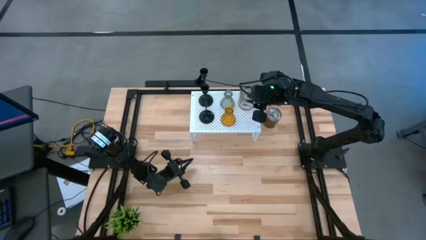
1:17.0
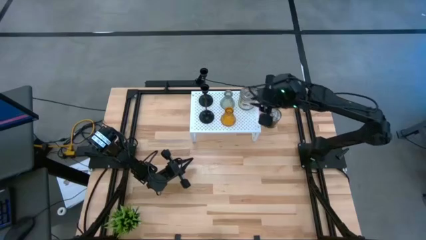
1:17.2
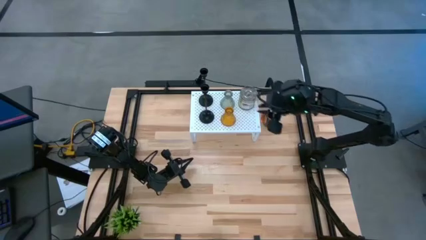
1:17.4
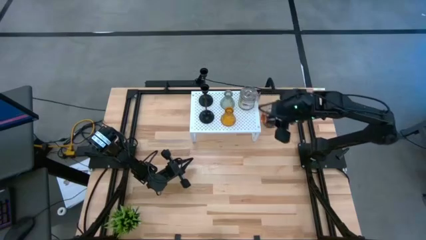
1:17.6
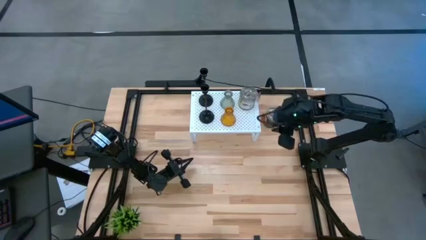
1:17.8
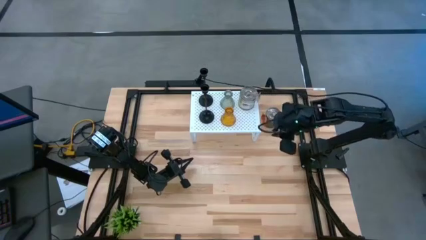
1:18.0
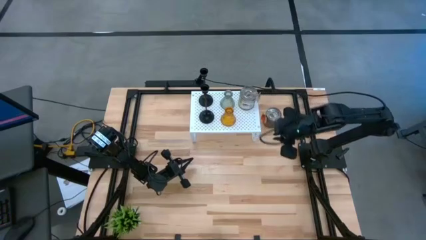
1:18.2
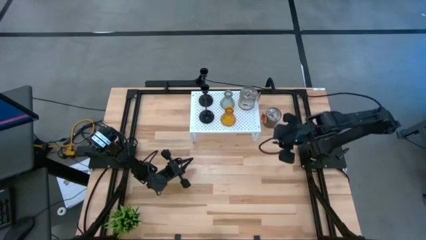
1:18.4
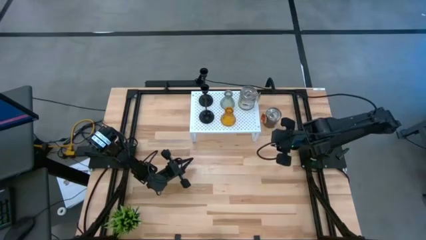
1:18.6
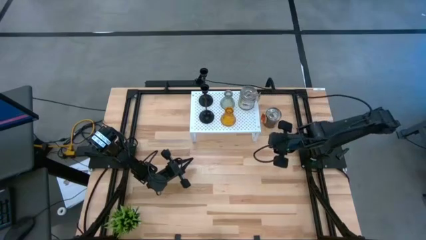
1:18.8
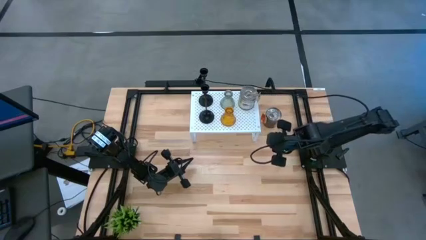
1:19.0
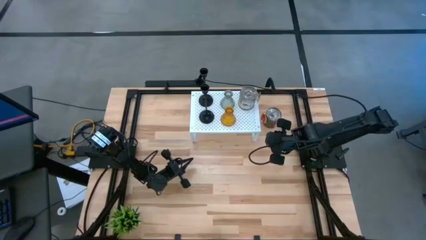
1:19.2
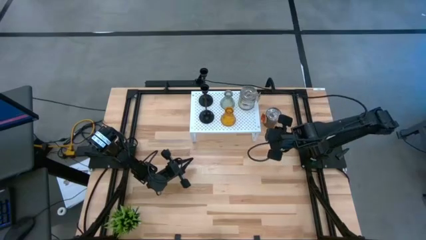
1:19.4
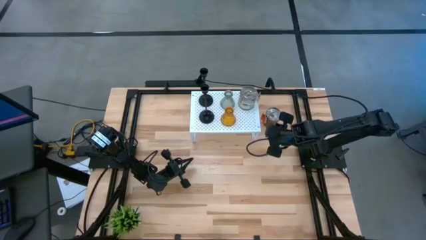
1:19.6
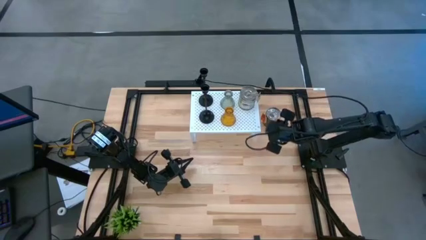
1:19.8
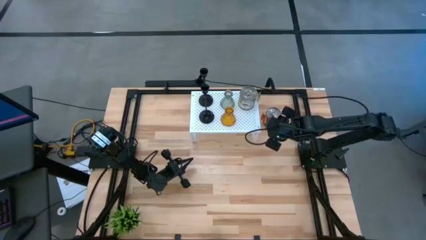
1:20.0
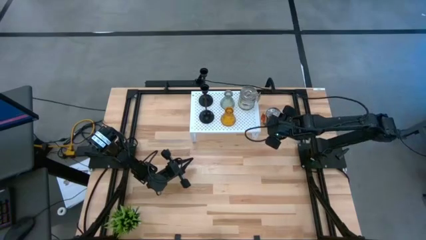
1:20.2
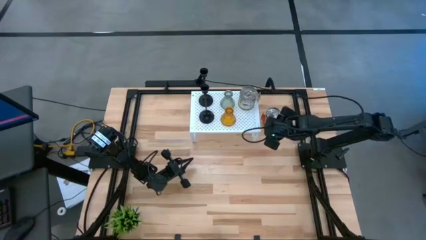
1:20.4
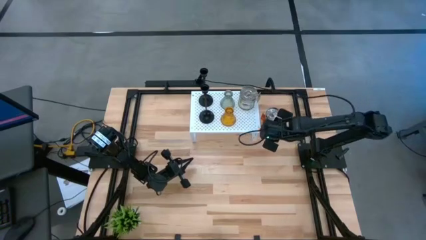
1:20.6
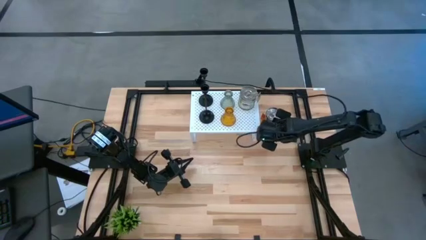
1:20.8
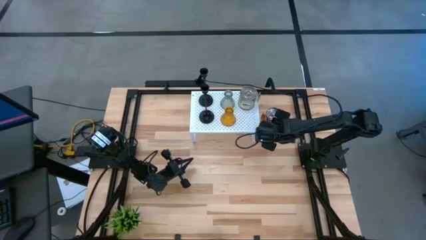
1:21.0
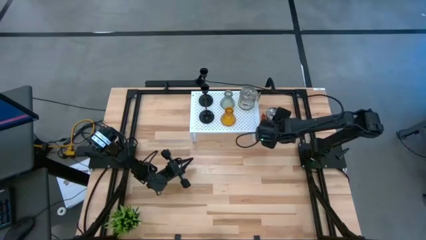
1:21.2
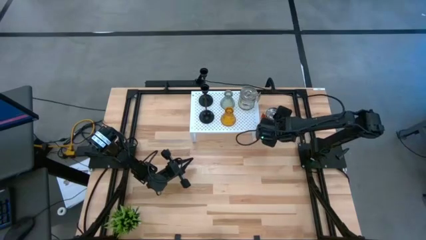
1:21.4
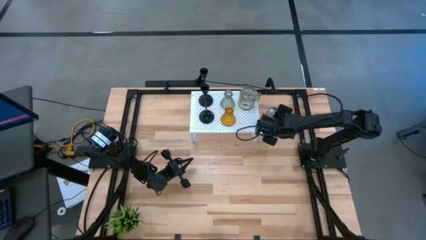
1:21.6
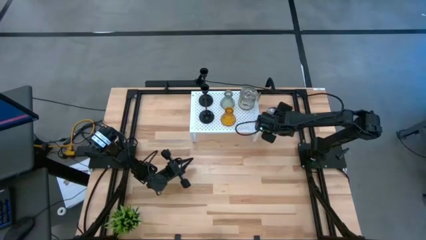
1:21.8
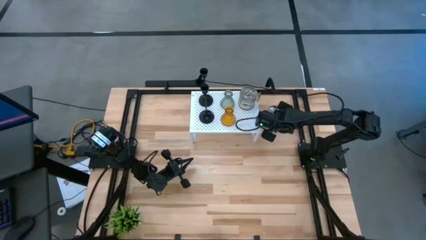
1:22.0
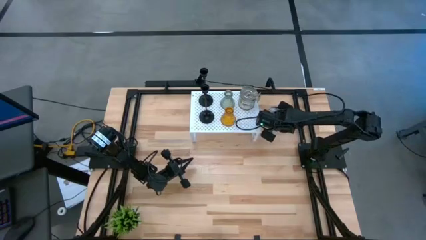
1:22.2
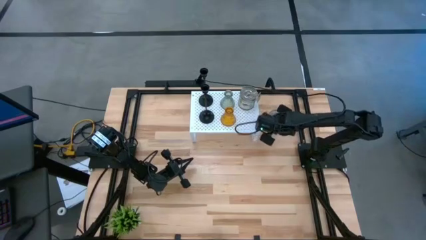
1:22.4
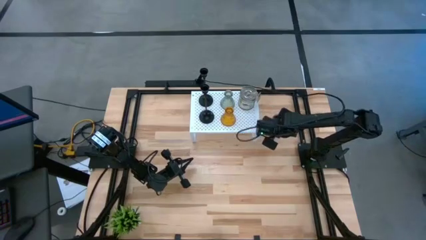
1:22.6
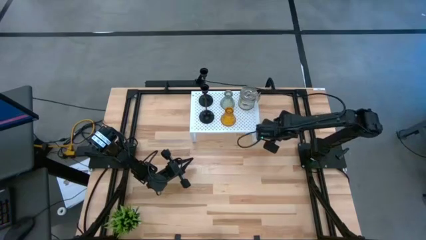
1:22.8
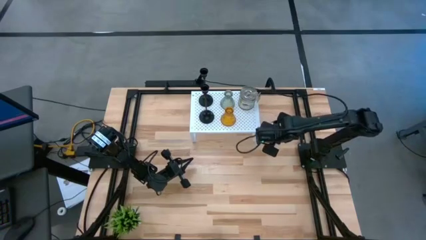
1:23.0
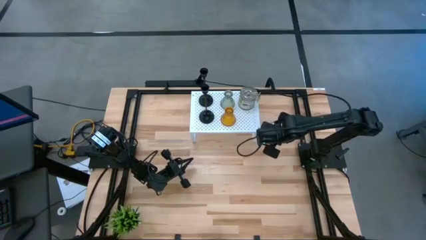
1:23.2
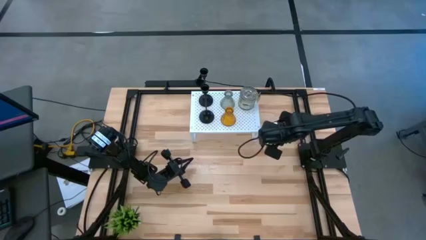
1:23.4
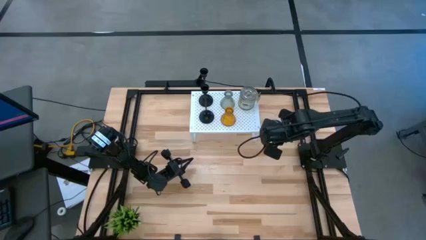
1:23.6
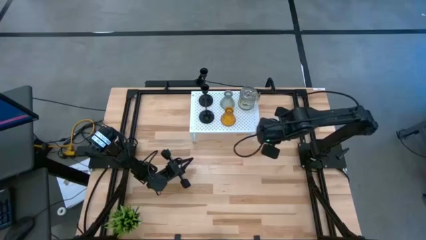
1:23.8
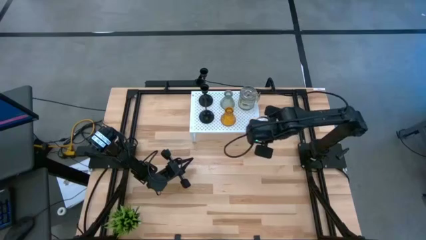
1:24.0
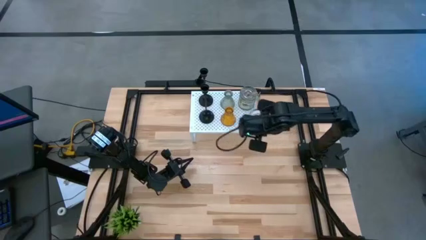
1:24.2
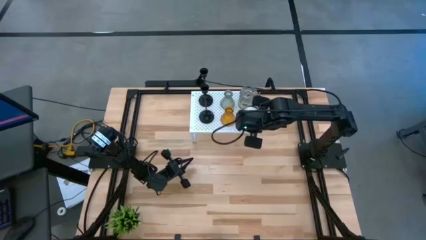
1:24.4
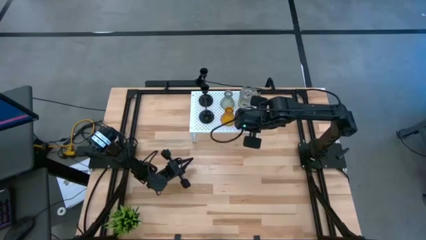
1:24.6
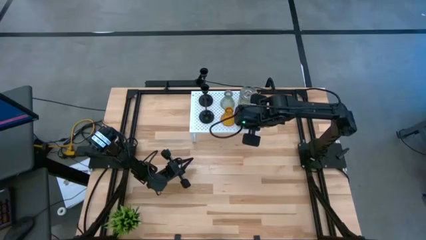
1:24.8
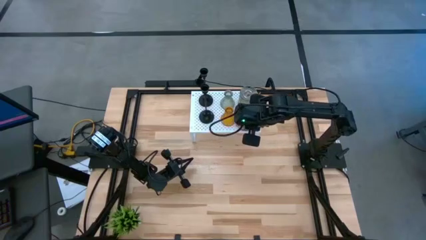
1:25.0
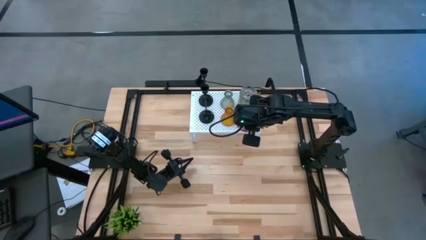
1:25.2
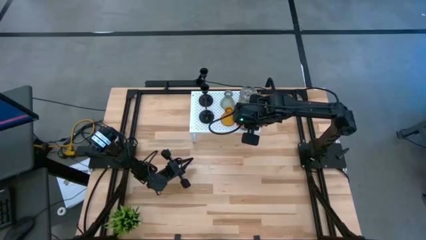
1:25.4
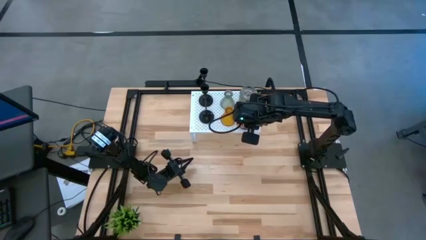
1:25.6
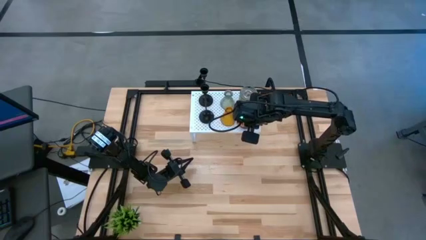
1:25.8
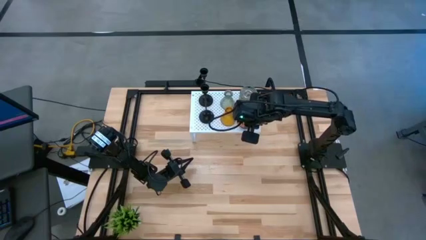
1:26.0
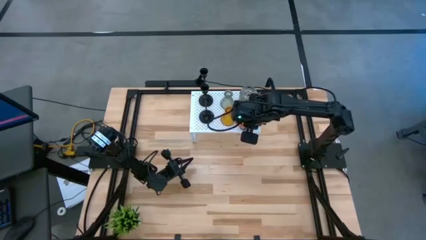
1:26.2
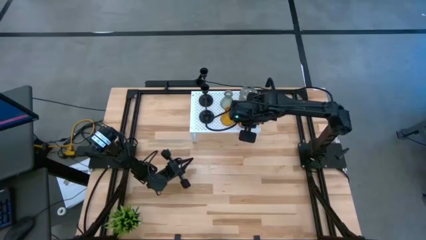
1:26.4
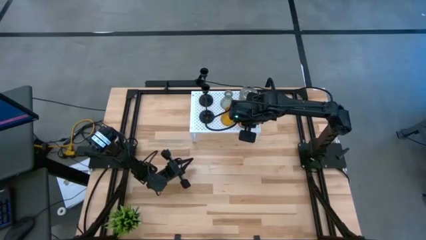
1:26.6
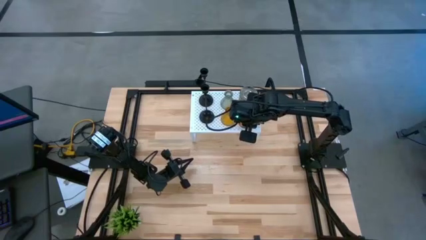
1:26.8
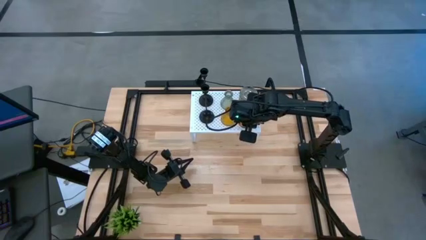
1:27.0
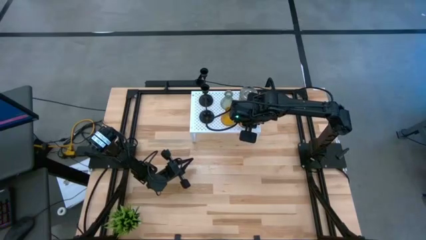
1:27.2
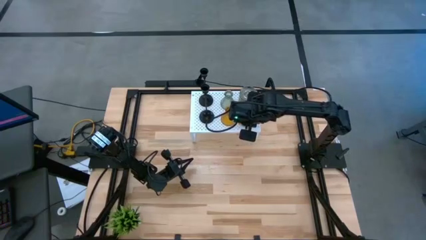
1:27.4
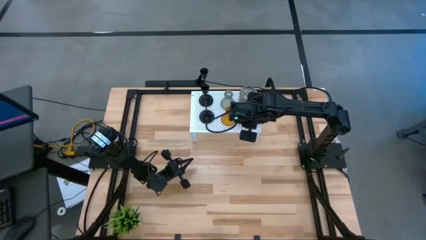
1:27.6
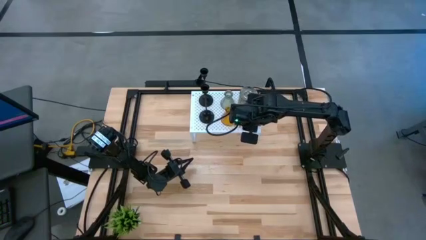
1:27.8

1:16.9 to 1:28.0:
Task: Pick & Place candle stick holders
Put the scented candle on the shelf

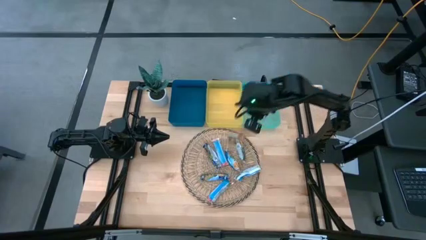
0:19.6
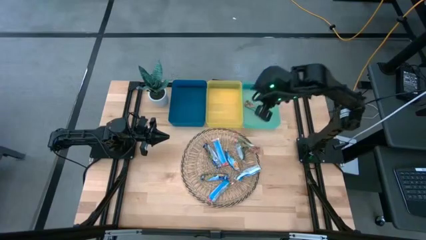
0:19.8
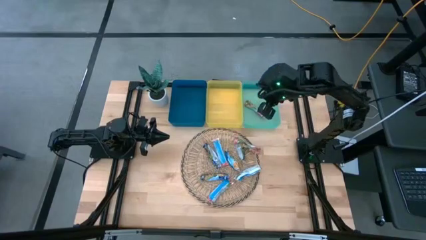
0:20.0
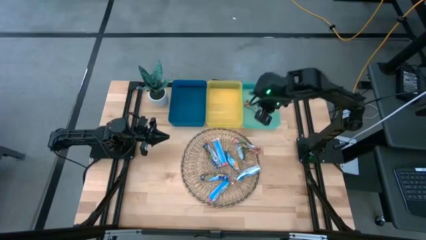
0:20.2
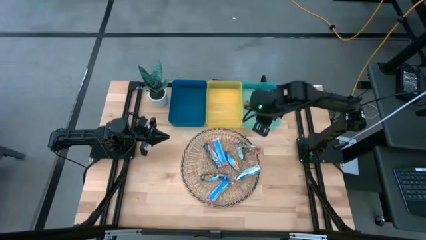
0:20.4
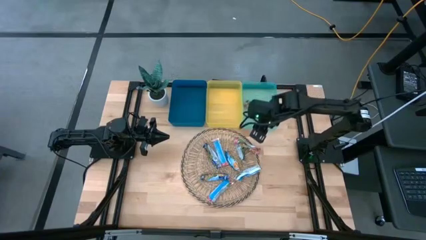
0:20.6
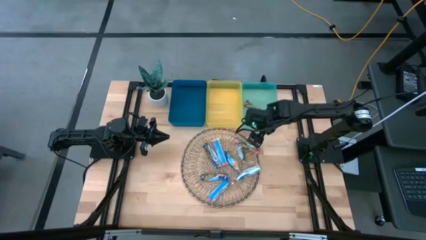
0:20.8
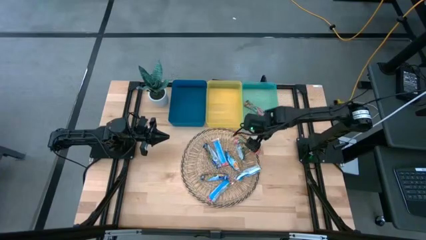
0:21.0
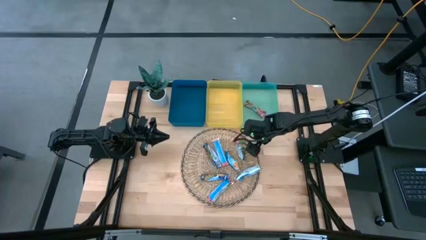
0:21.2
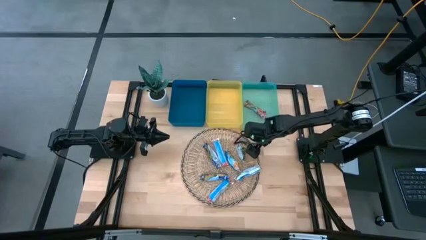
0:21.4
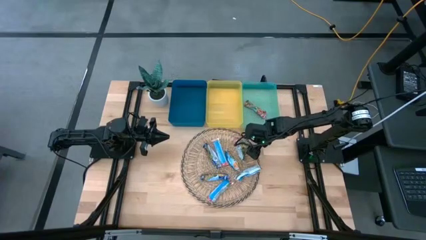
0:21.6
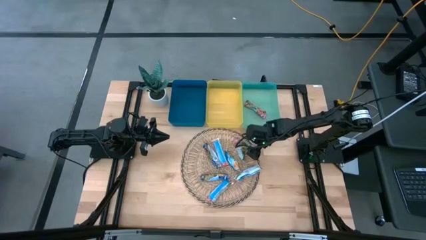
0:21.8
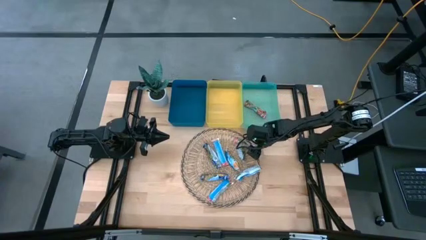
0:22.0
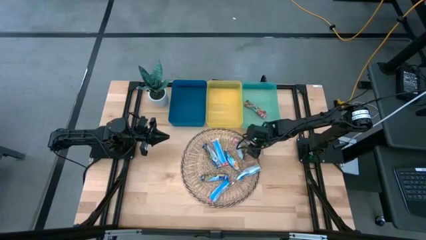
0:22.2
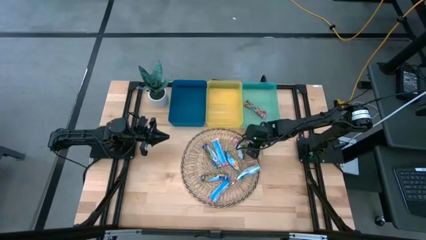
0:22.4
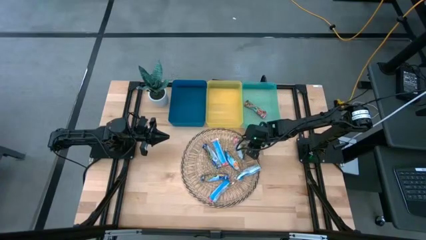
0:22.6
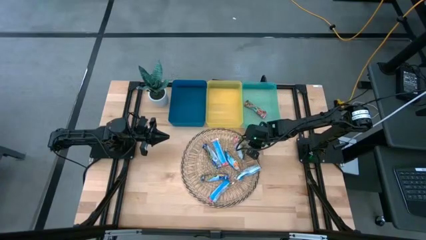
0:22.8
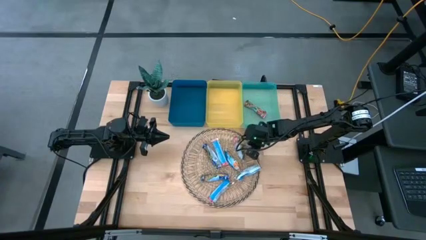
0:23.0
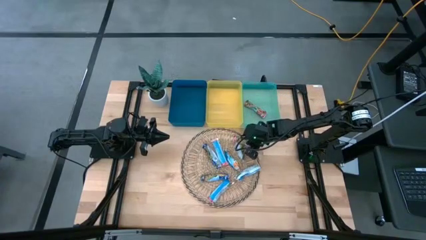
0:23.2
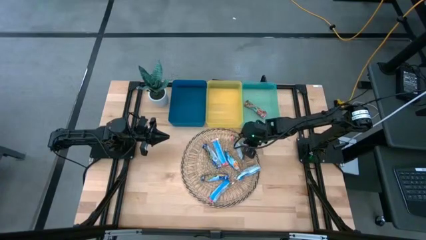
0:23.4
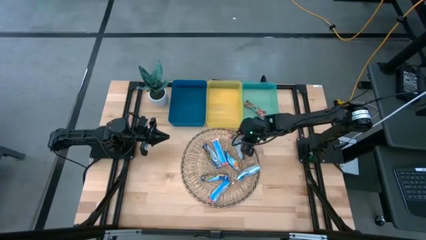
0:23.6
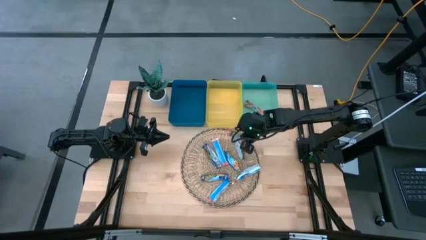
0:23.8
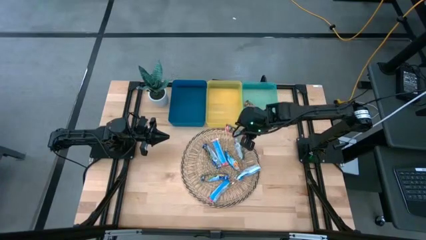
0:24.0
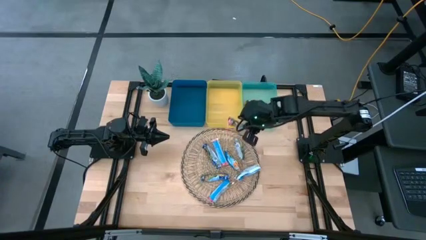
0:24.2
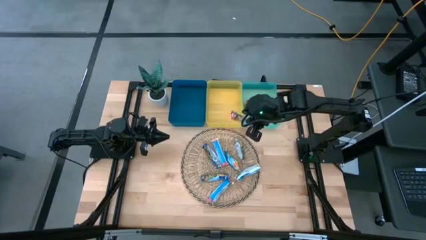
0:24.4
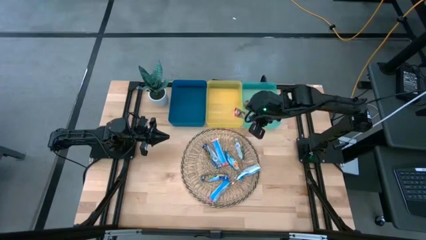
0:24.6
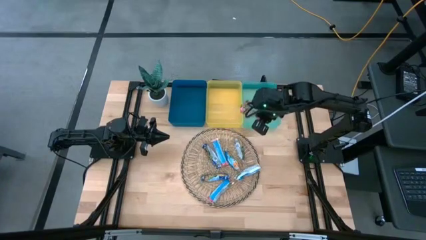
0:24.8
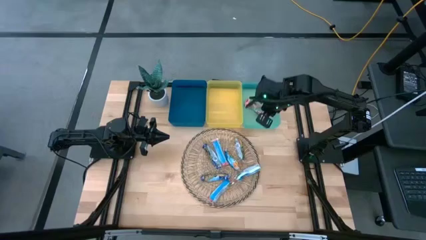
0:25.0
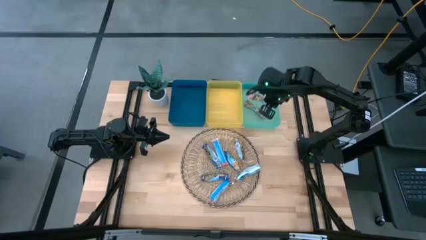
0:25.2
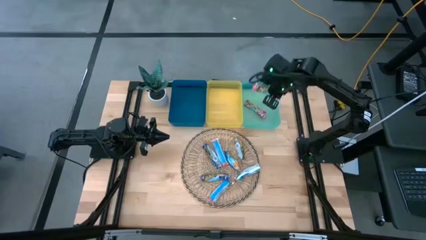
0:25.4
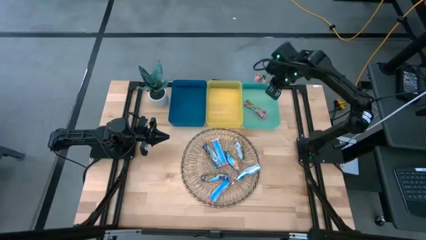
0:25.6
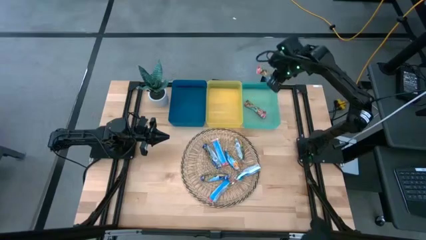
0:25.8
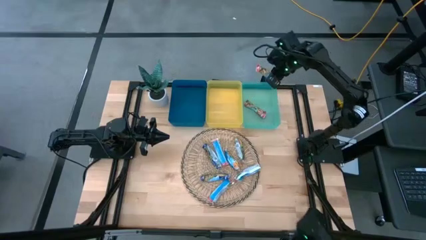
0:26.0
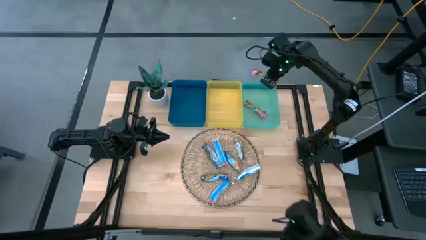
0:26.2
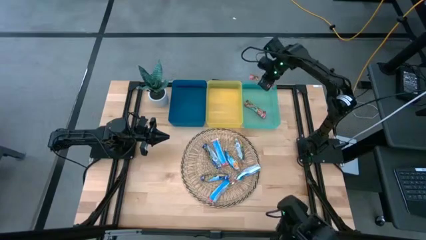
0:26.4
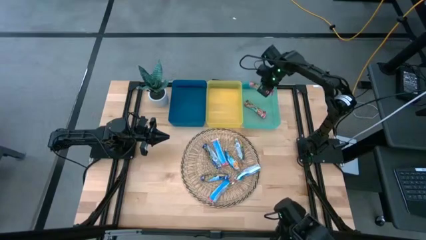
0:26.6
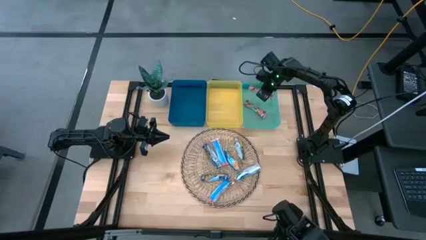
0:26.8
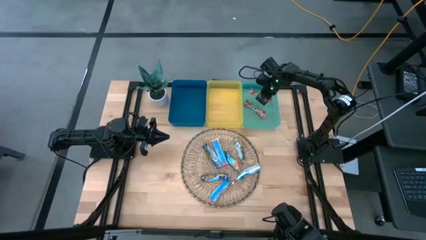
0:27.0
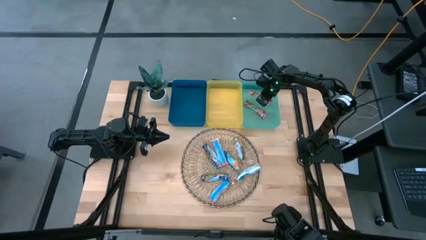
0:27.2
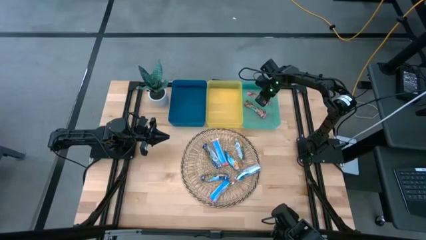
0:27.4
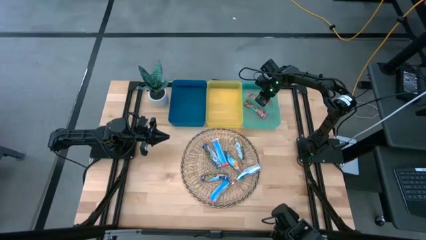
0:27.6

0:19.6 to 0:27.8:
Task: Pick and place Granola Bars by type
Put the red granola bar into the green bin
